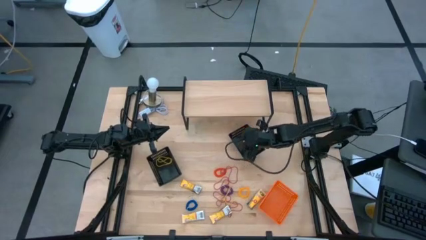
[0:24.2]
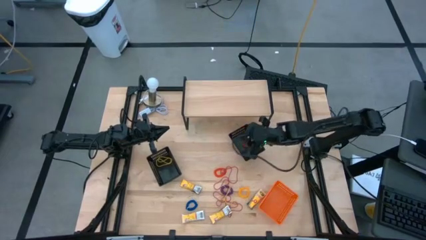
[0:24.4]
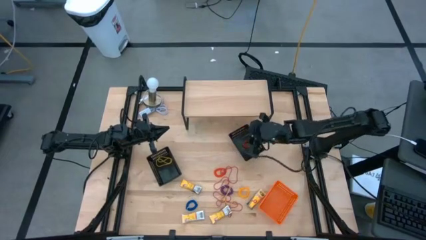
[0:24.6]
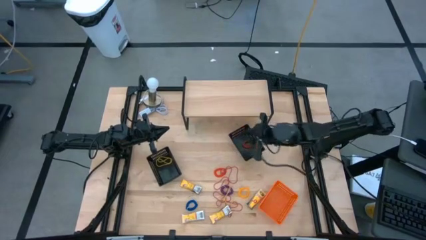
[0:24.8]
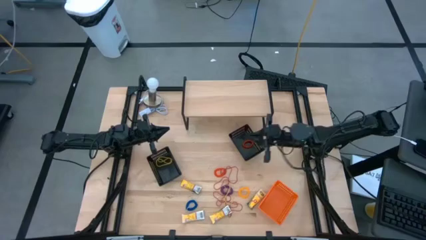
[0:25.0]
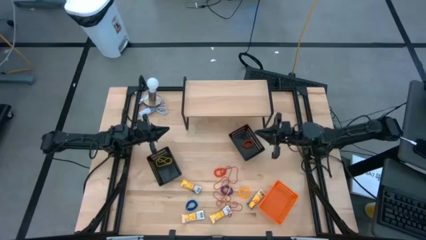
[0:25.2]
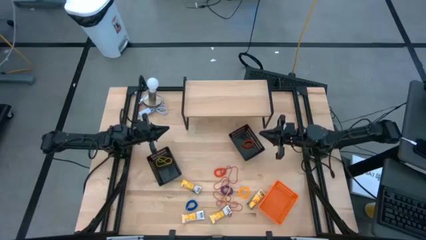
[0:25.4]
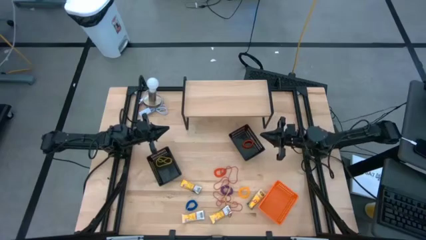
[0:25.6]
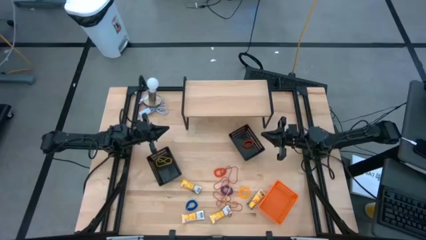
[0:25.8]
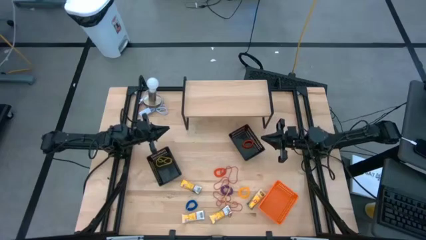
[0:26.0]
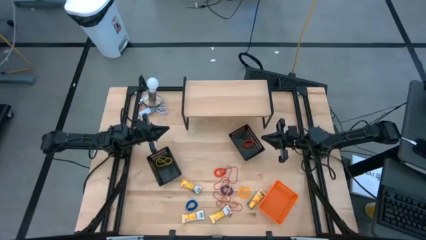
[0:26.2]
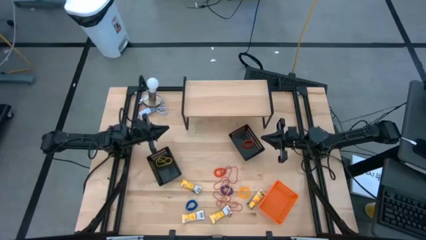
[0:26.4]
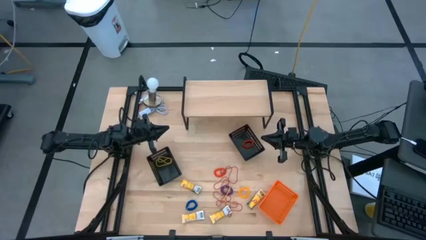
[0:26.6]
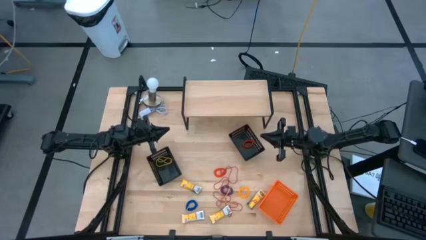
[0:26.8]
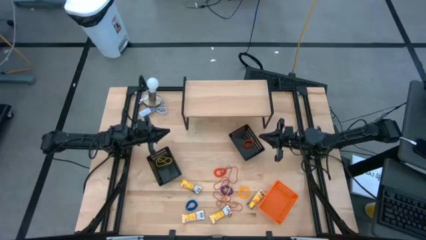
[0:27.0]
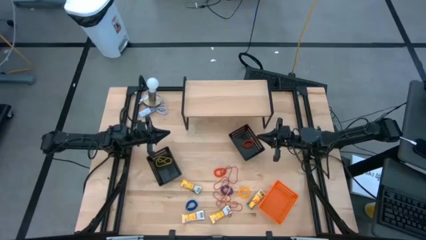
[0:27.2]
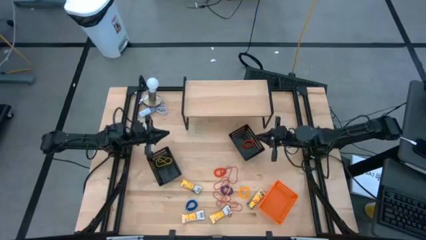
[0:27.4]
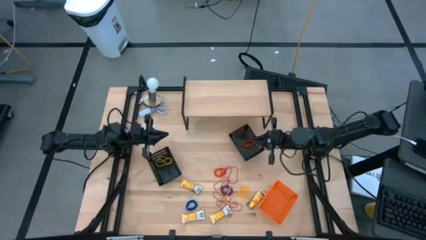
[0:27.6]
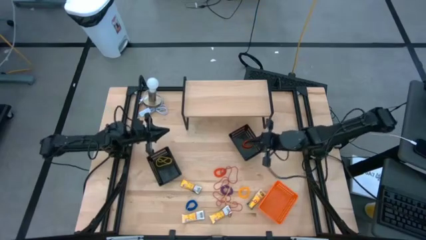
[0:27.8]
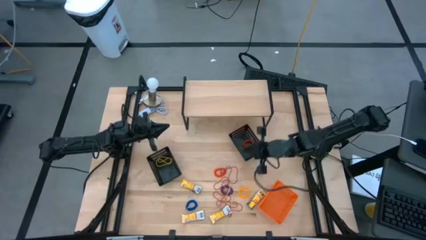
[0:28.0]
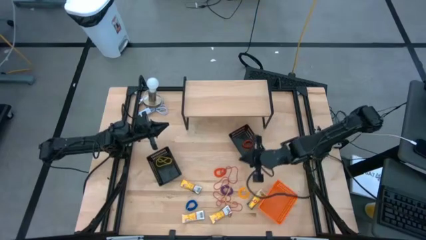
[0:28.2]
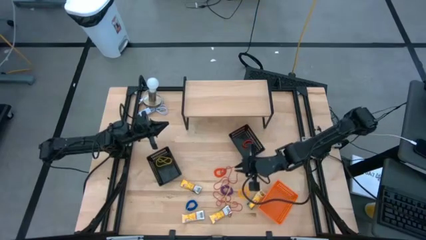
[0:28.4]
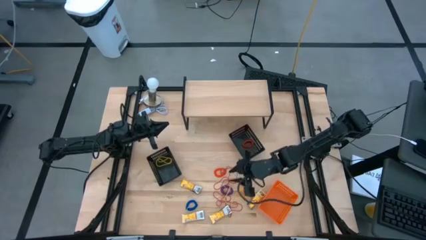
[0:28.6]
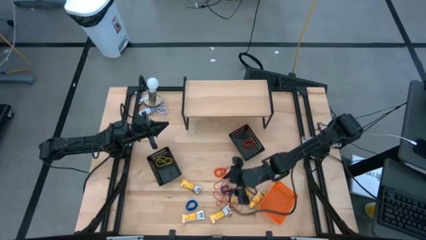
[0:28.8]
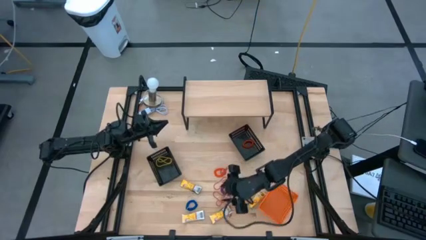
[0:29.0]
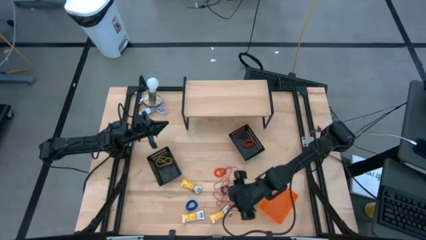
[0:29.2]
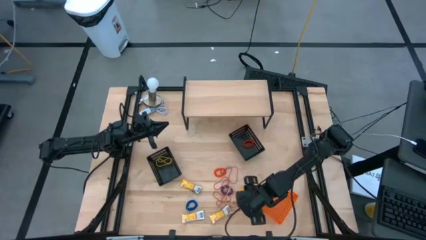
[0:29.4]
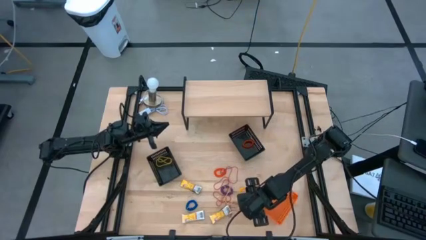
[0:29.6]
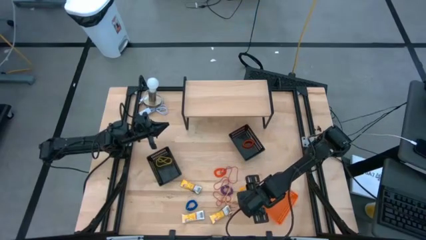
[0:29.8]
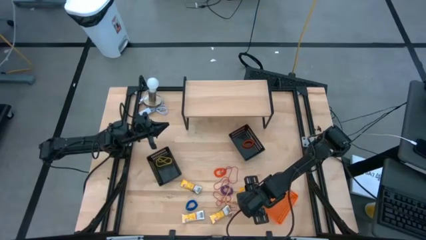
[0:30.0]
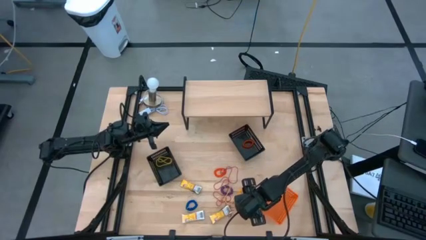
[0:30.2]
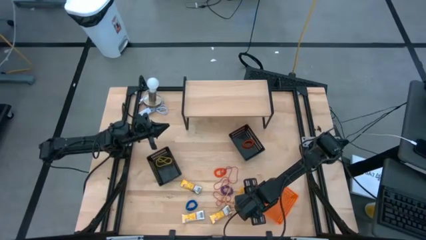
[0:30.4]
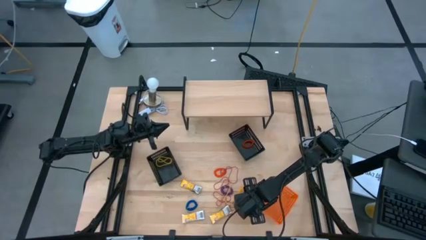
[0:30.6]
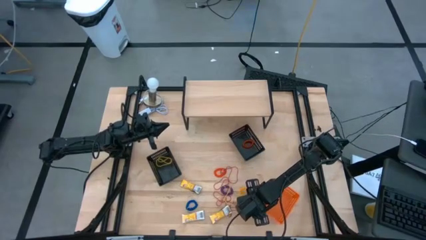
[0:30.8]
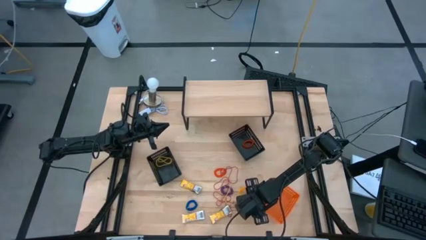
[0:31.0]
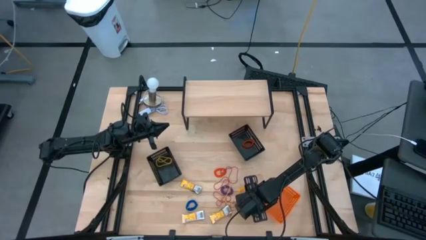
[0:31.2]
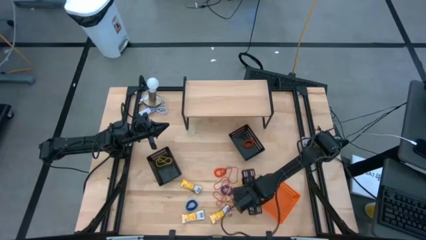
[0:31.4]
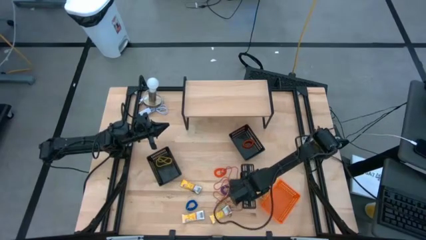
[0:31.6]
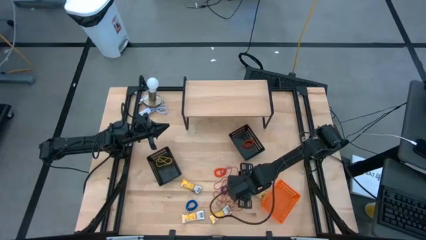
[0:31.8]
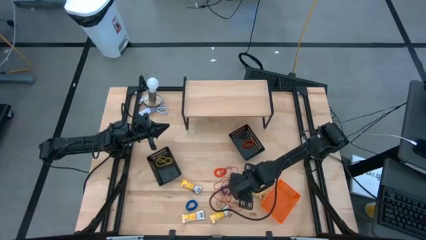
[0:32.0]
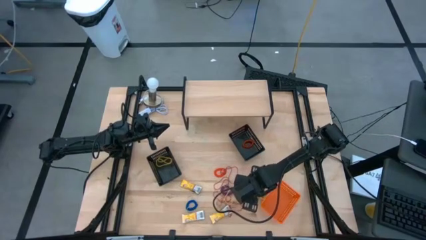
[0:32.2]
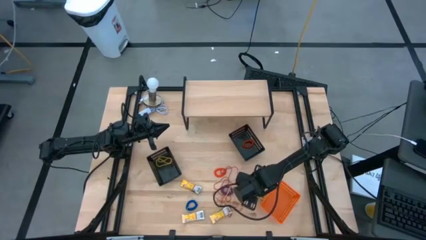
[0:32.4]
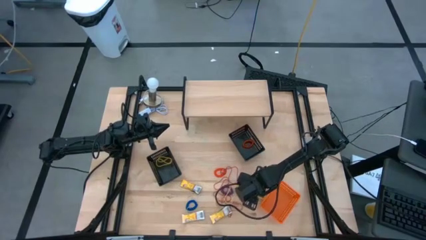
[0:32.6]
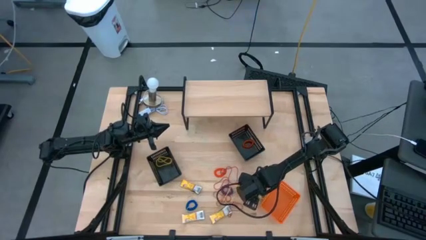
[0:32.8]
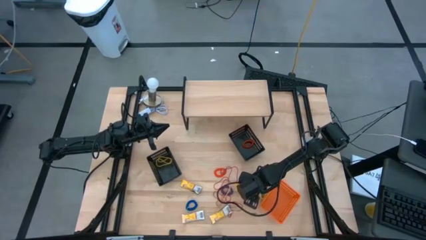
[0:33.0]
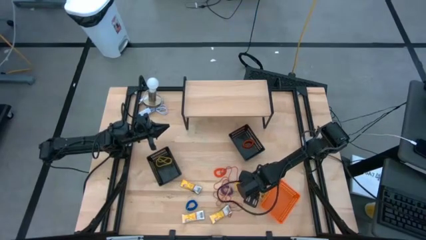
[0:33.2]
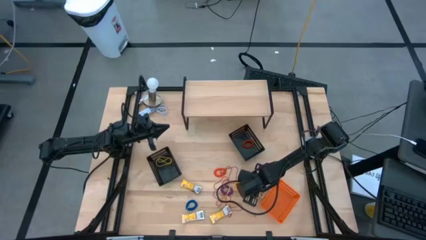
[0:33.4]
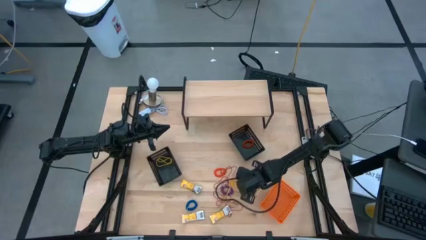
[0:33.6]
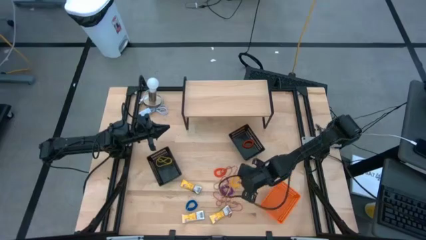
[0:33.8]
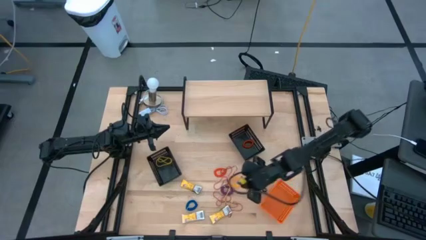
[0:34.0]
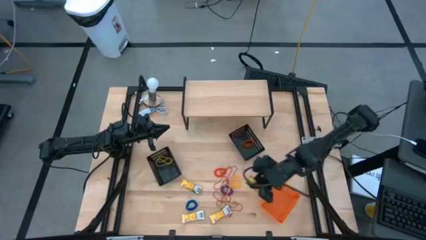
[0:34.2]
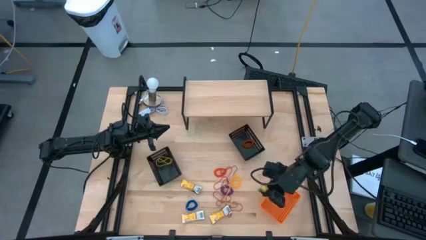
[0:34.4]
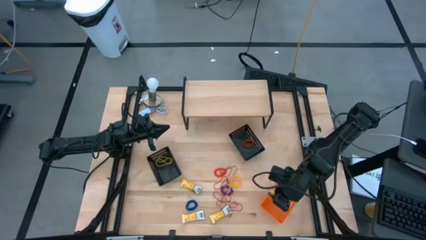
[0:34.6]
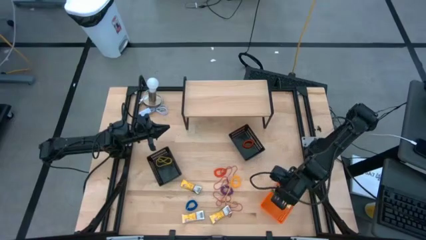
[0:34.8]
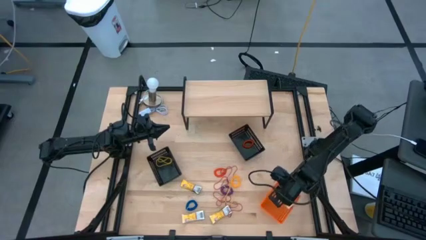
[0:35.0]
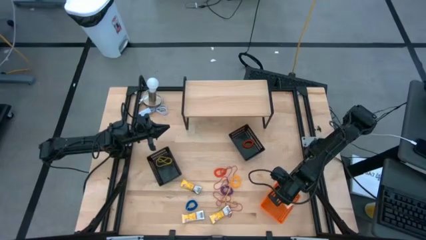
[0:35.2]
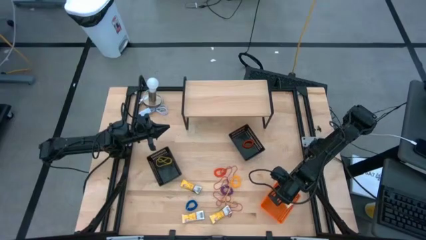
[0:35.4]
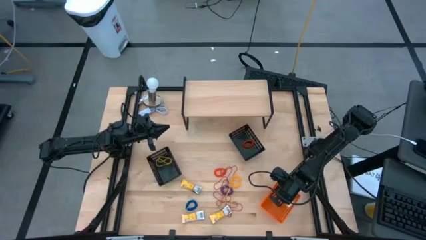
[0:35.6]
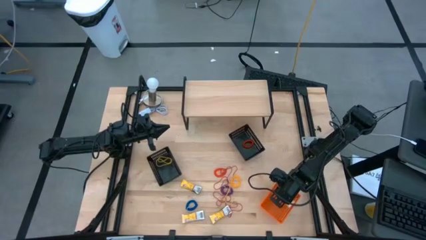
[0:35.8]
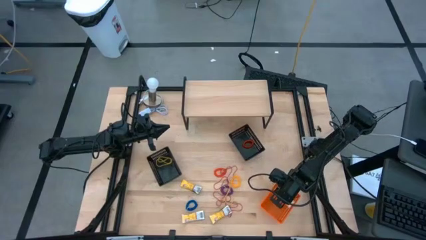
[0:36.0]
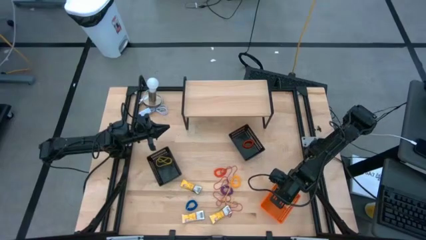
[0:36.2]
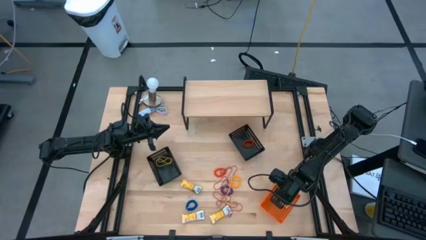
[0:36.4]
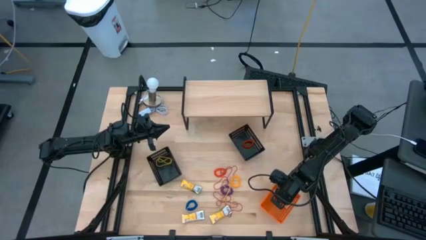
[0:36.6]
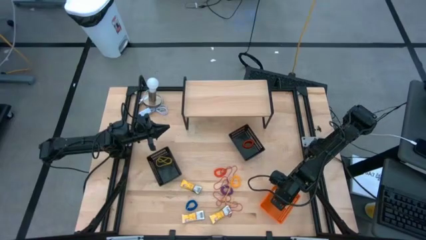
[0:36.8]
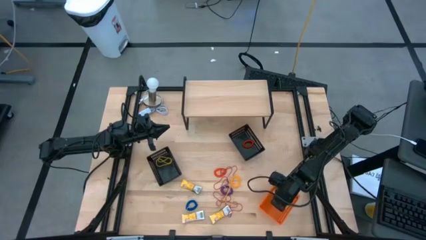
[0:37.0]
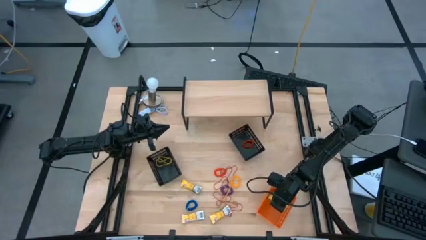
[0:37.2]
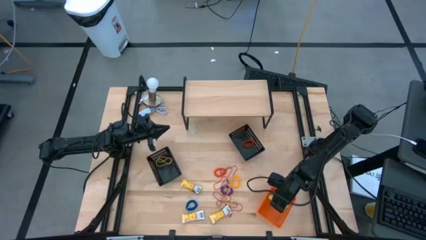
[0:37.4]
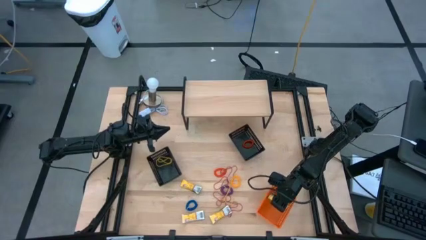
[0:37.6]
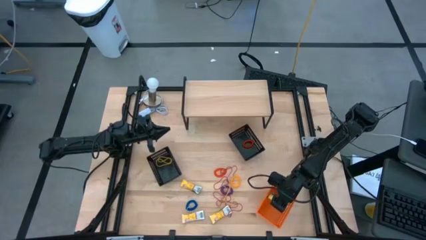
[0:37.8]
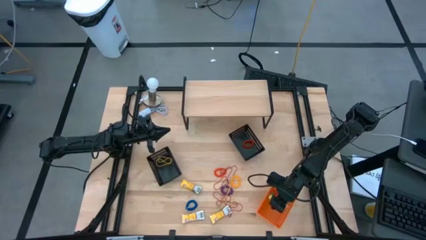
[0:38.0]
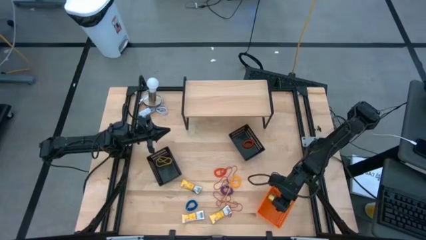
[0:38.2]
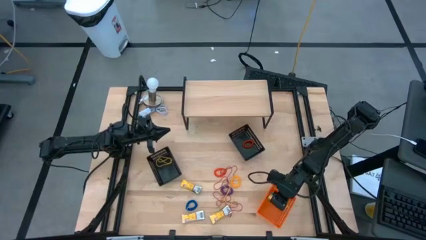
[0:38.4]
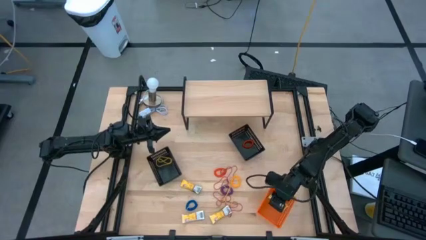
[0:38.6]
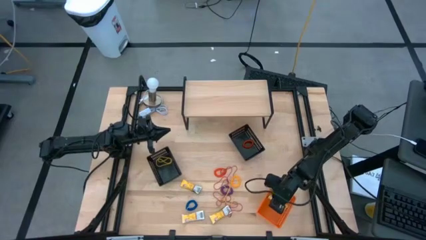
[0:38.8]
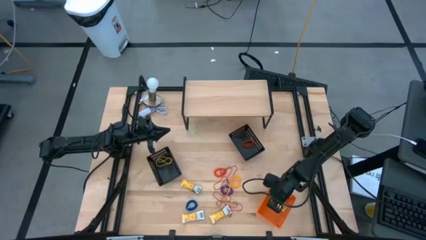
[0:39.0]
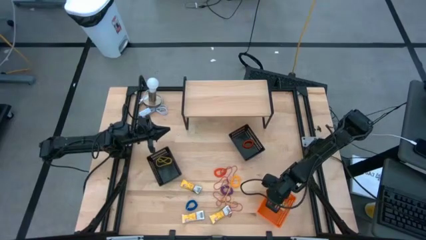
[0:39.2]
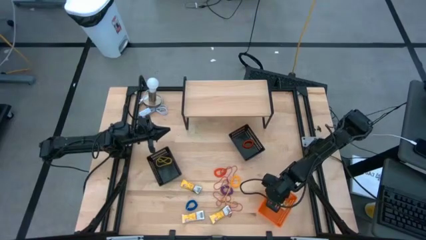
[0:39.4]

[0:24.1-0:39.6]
Task: Pick & Place Office Desk Supplies
Put the yellow crayon box into the orange bin
